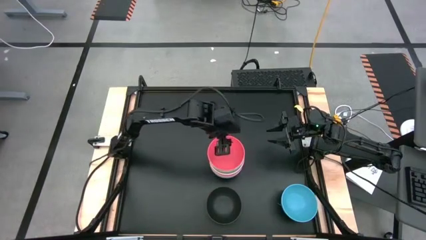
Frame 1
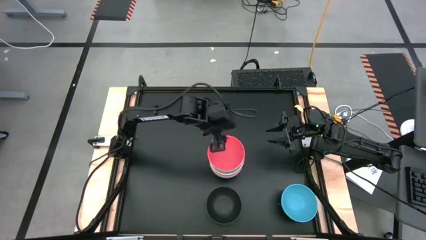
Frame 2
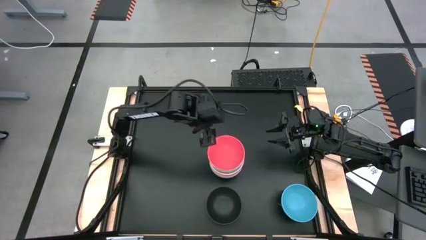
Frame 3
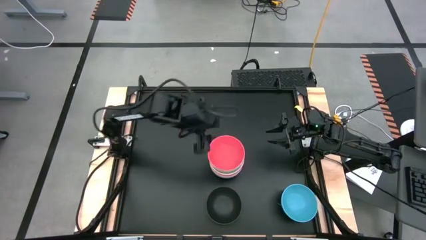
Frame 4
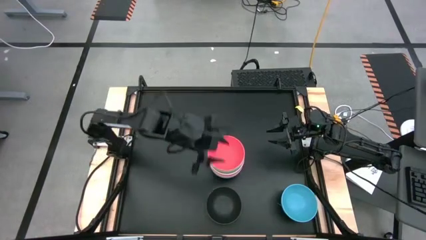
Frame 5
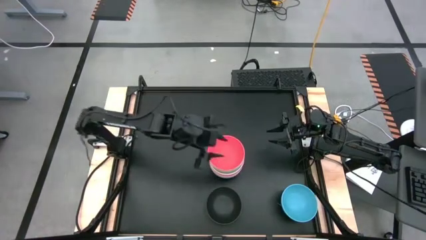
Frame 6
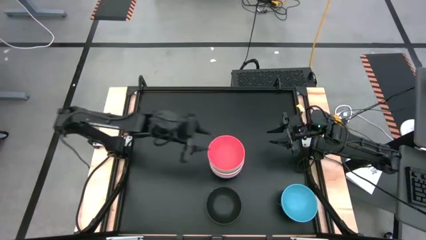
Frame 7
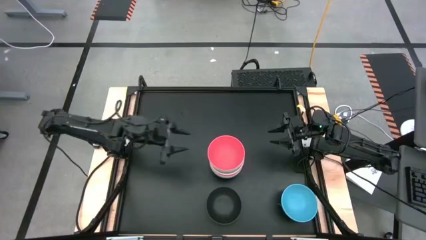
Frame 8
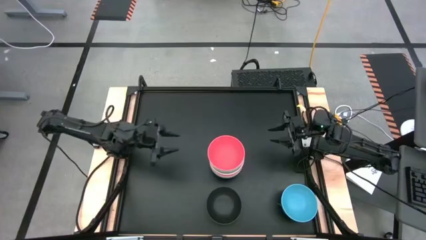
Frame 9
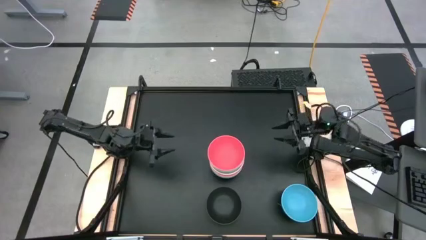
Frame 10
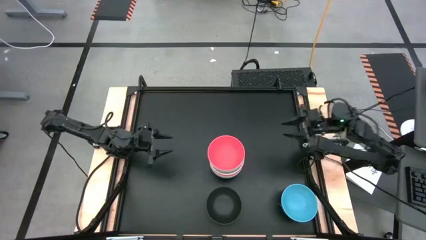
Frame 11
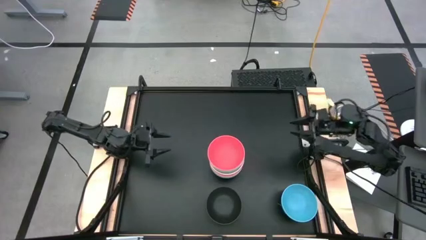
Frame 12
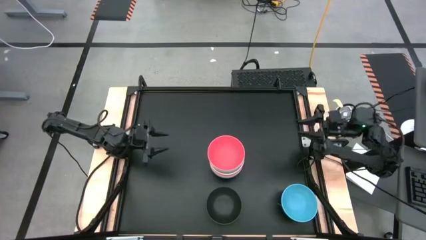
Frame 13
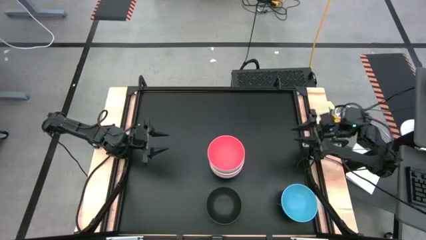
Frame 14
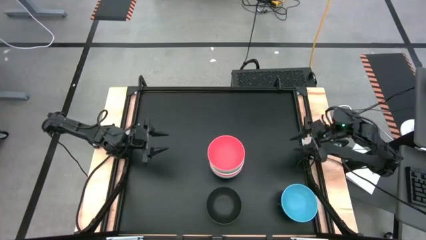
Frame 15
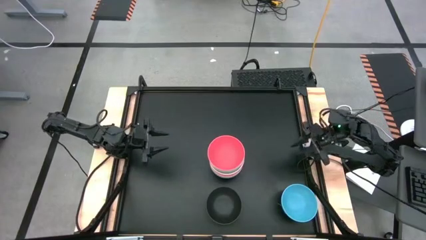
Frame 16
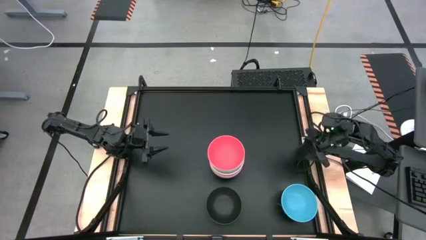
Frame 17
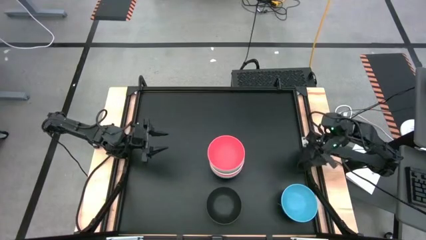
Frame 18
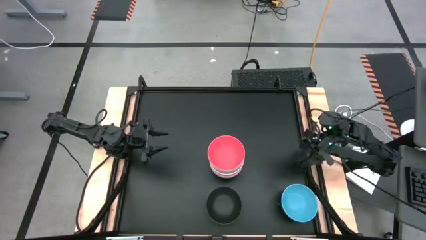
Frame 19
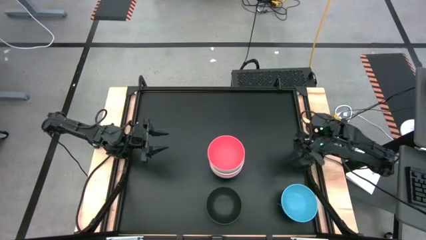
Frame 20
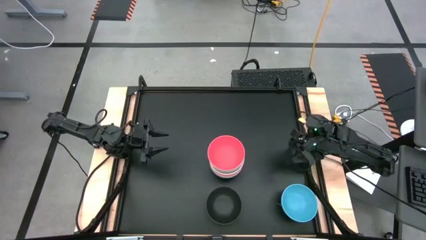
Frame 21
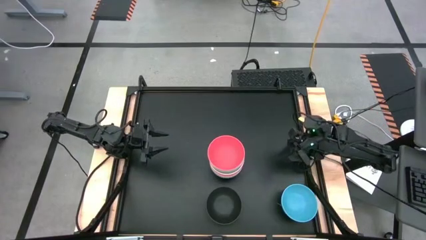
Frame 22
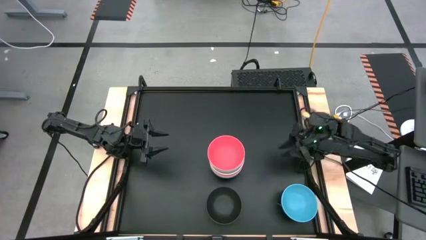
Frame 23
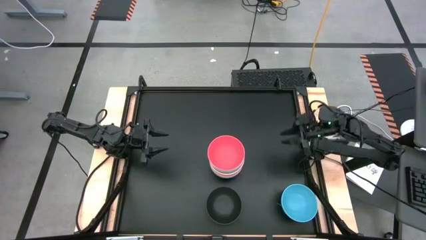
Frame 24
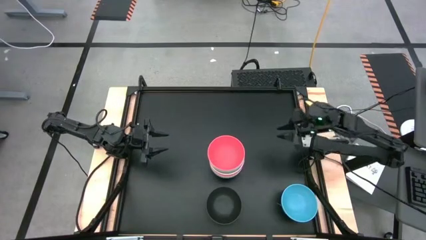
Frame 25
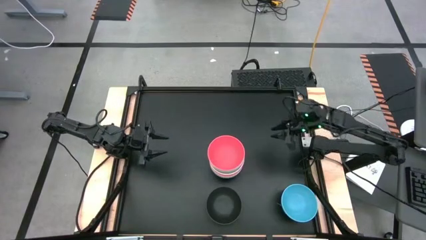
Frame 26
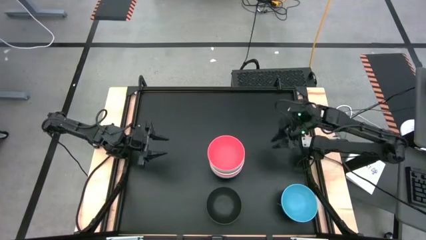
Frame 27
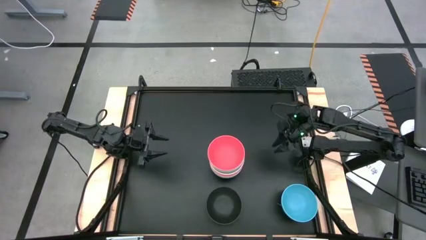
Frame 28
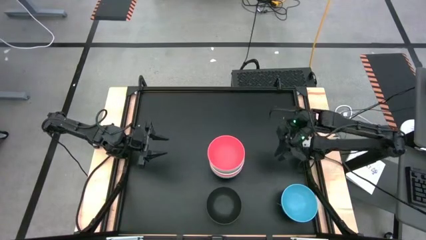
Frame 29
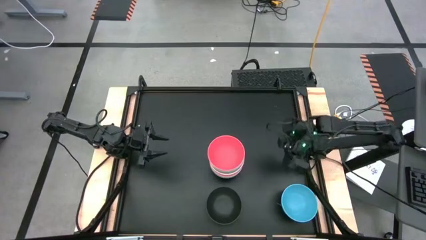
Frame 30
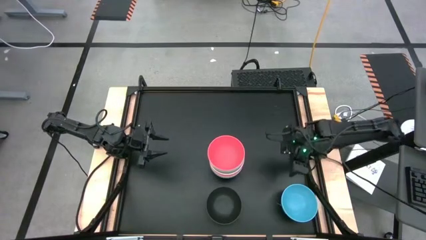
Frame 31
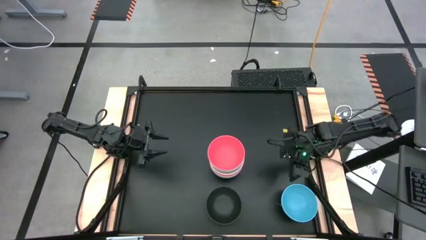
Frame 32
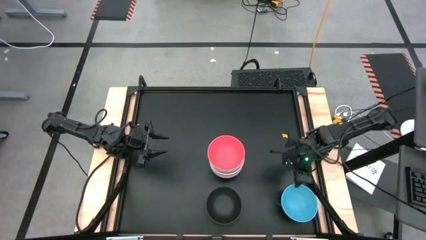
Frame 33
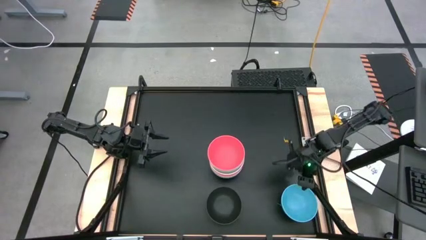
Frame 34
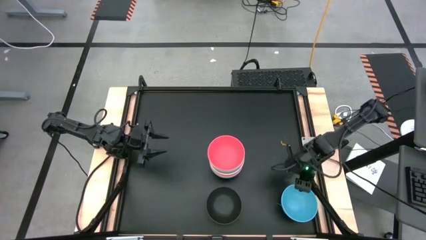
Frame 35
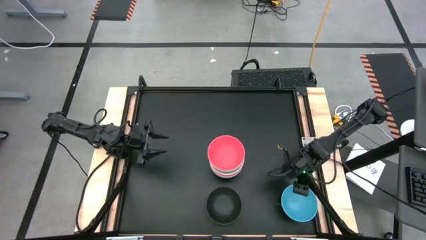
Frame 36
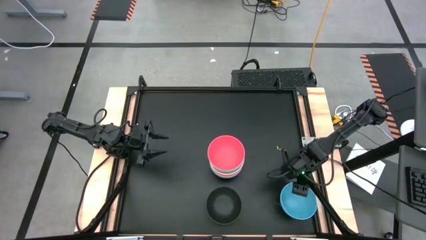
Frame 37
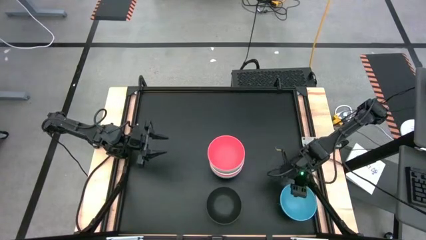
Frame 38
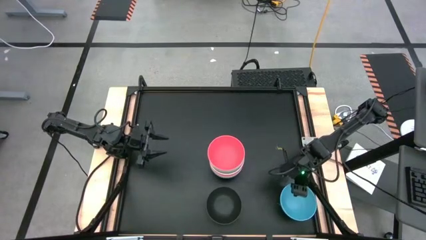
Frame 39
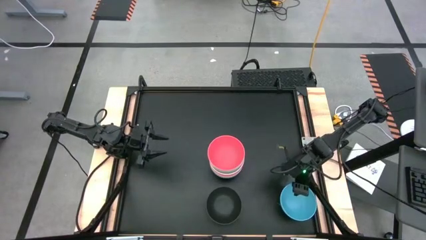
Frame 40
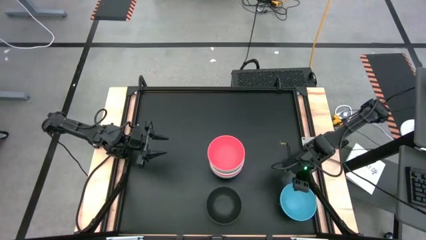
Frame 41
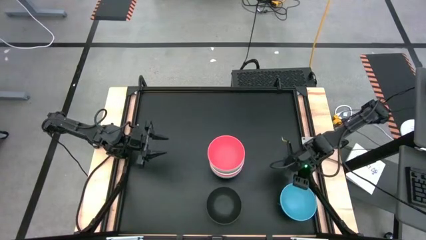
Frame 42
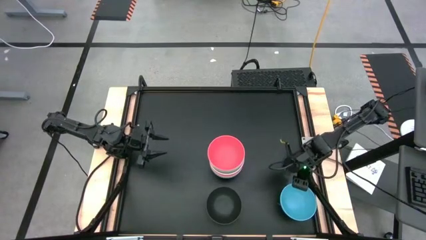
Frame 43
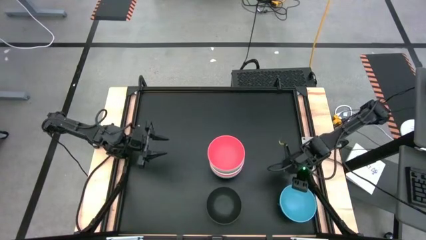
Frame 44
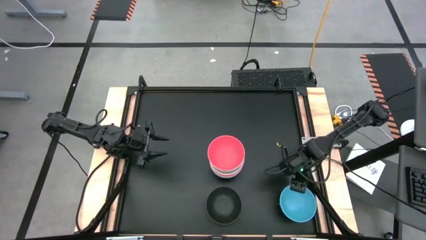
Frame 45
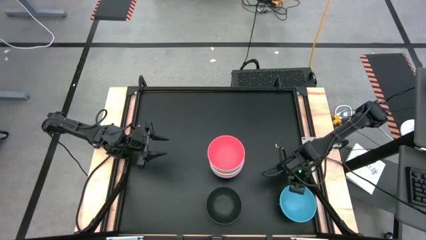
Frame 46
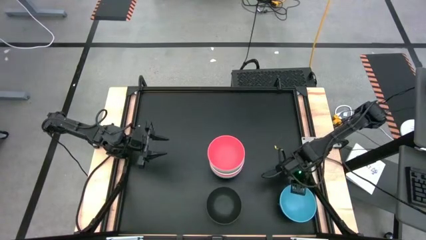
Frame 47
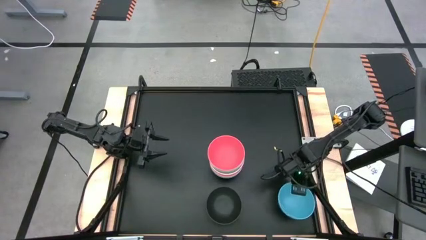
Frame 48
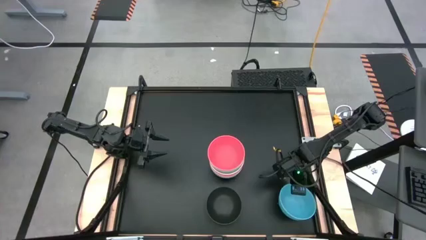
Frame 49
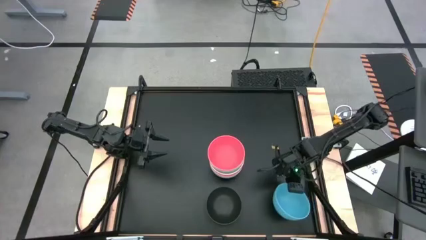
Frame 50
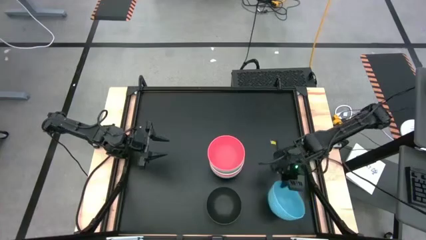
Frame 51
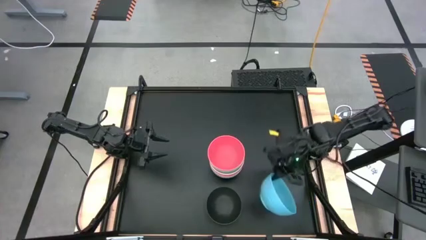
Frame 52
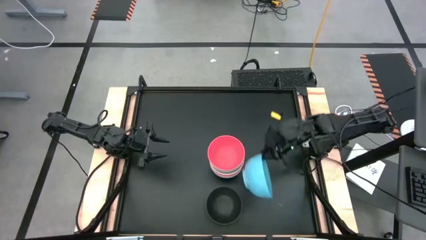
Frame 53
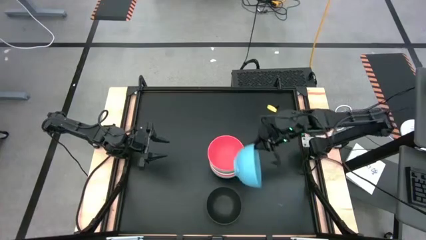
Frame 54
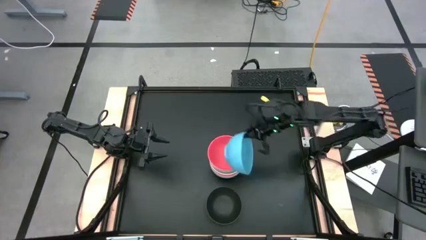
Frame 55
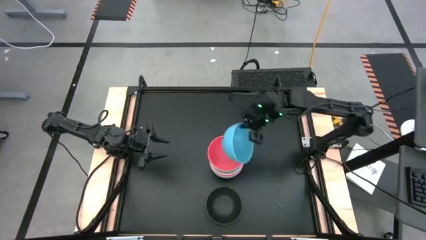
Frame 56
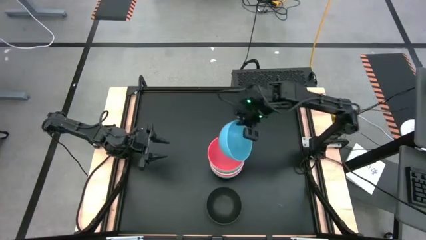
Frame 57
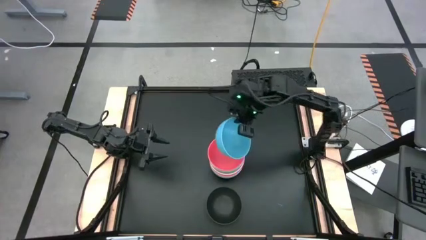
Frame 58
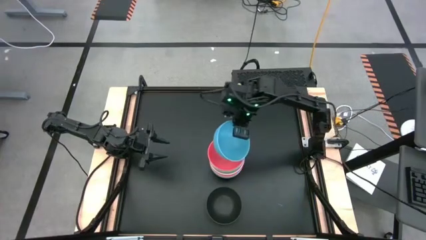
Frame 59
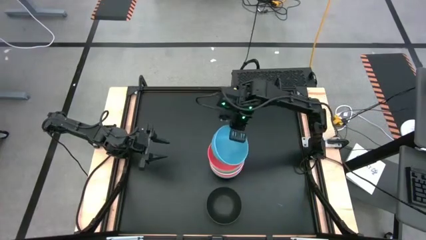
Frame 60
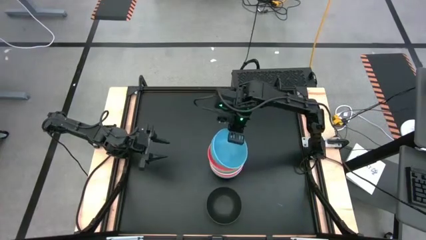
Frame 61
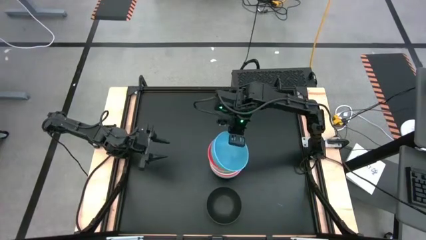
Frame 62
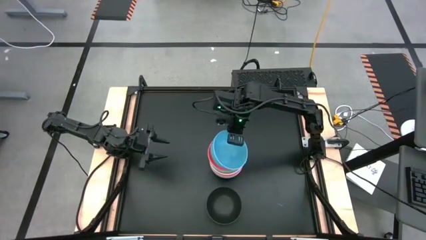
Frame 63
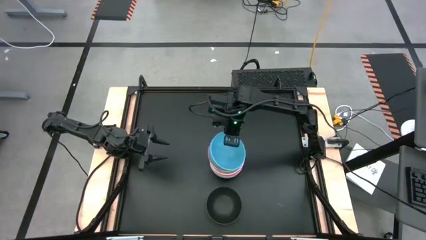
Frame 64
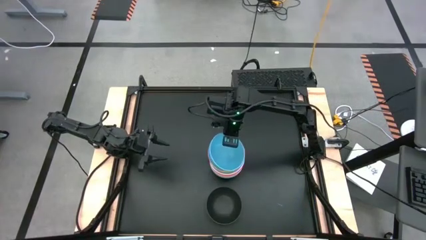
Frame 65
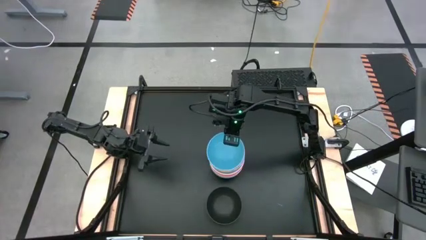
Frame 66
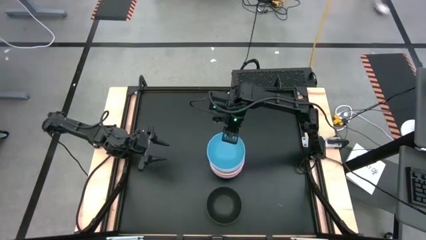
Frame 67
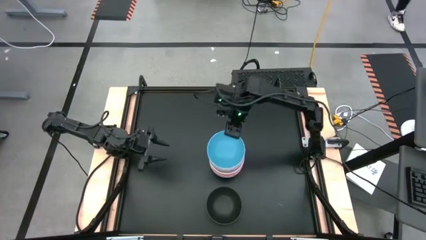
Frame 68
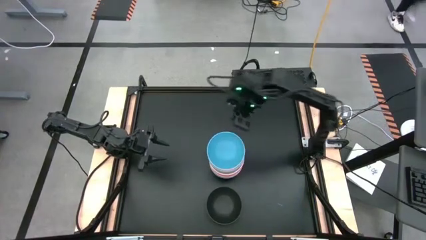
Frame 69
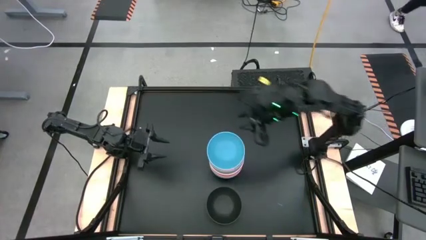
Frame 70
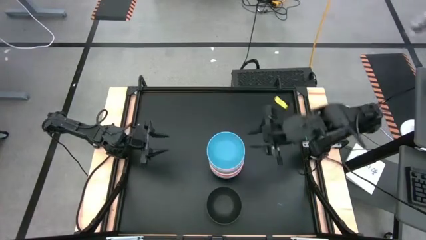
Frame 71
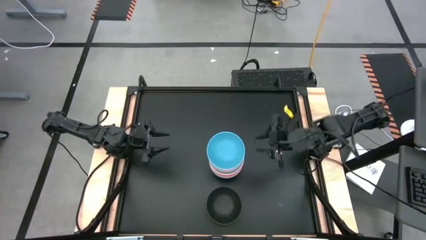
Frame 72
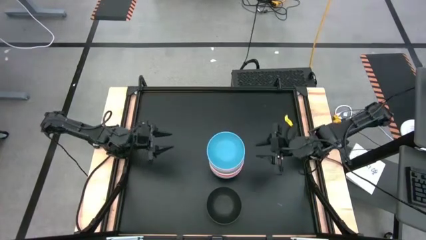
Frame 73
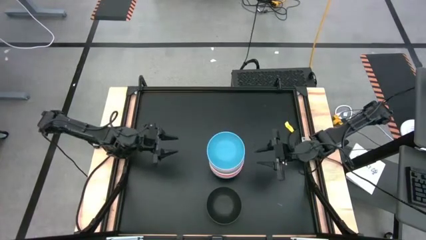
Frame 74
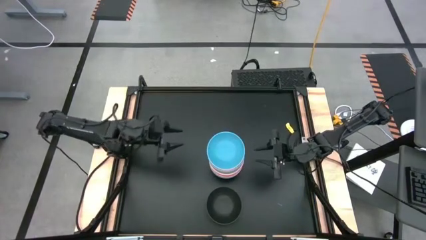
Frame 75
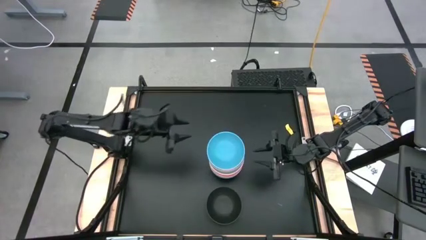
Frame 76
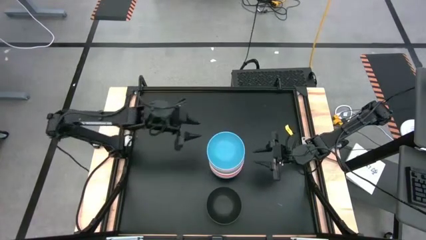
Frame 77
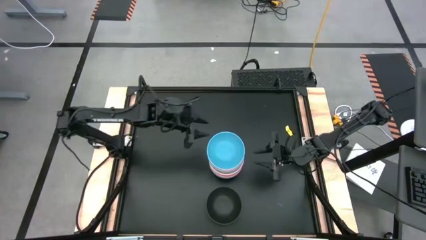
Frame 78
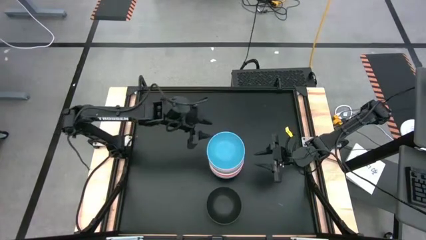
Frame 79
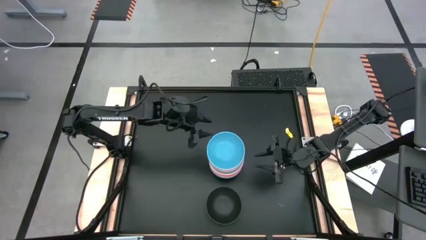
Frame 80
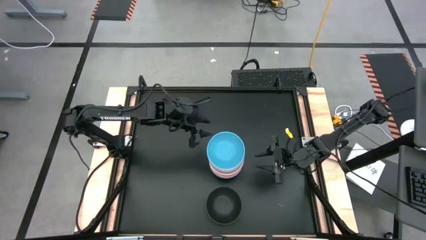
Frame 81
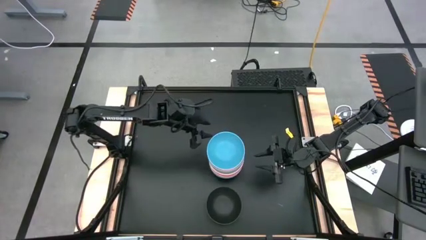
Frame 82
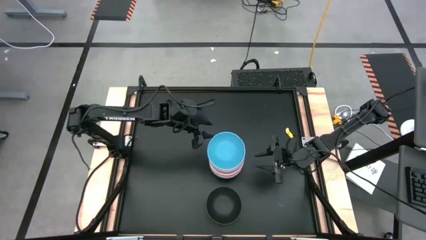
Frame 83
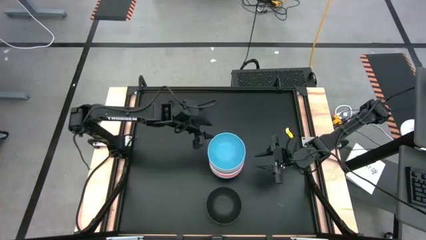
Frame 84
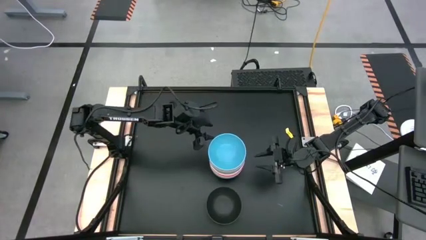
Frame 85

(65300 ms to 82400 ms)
Task: Nest bowls inside each other
Stack the blue bowl on top of the red bowl
